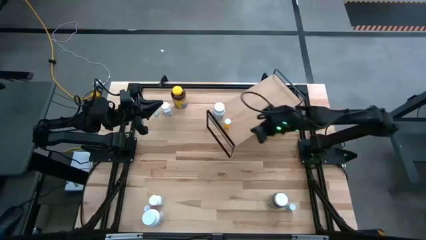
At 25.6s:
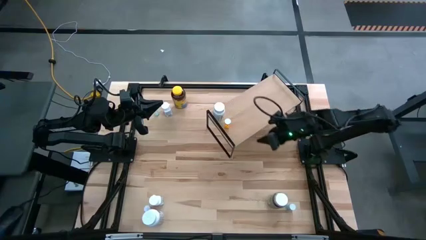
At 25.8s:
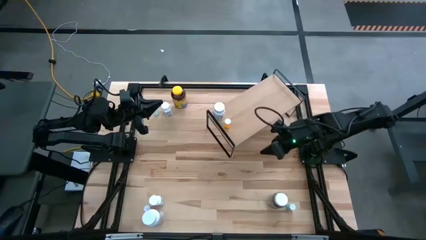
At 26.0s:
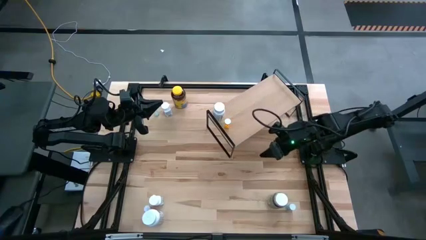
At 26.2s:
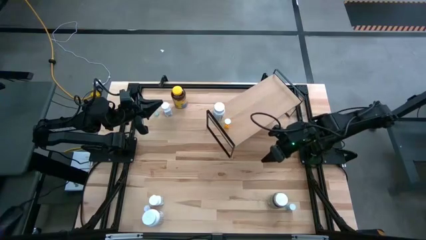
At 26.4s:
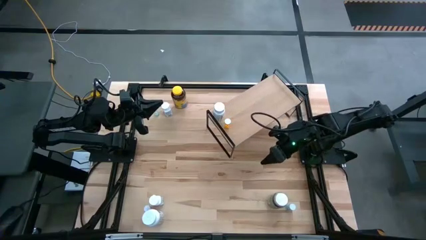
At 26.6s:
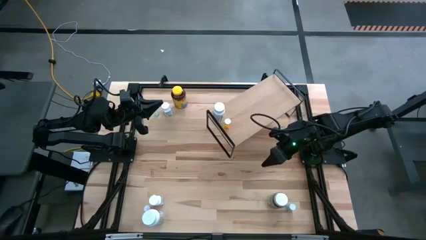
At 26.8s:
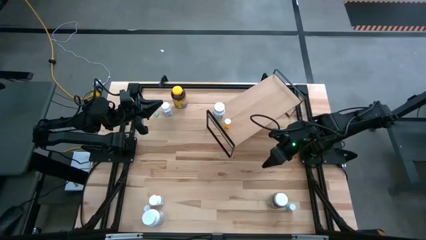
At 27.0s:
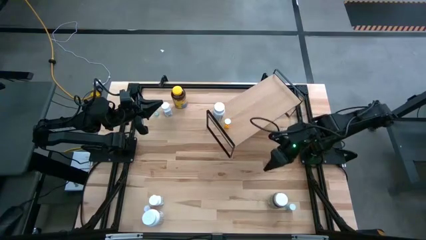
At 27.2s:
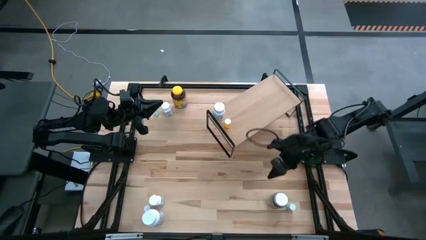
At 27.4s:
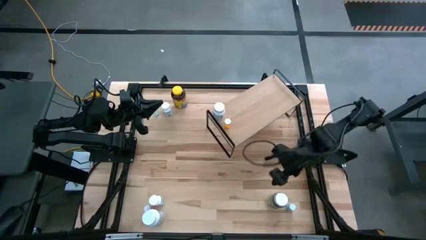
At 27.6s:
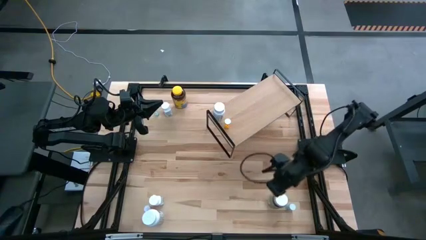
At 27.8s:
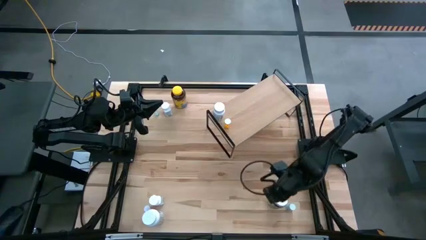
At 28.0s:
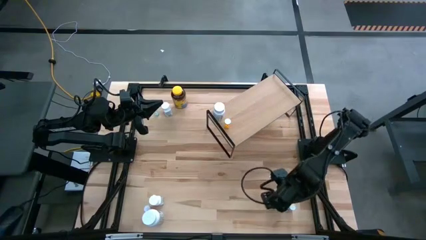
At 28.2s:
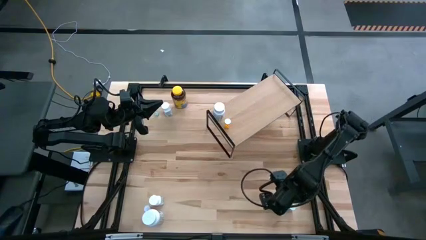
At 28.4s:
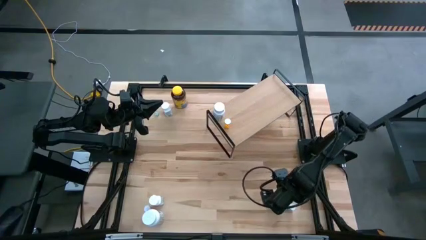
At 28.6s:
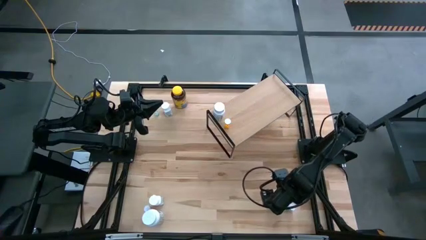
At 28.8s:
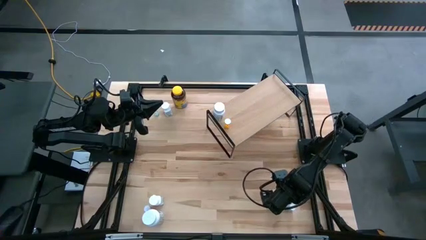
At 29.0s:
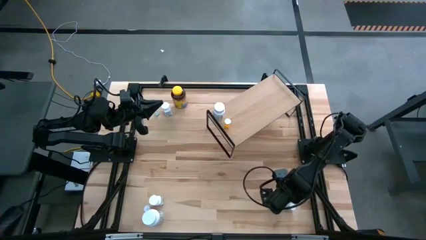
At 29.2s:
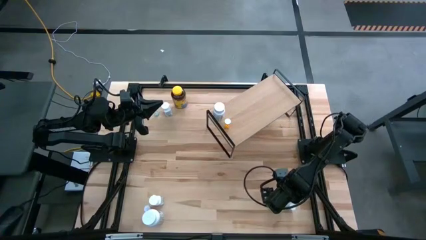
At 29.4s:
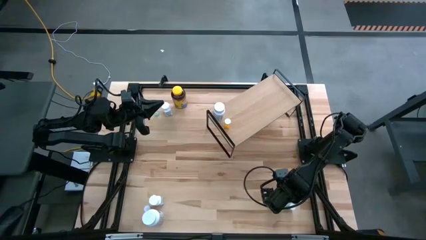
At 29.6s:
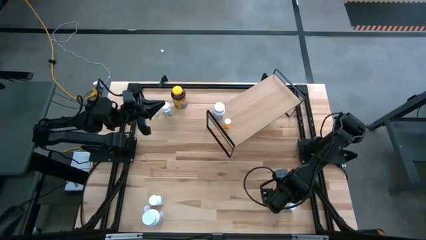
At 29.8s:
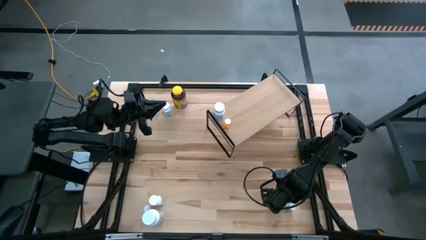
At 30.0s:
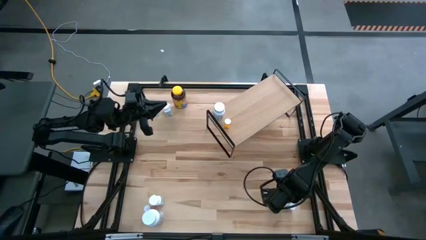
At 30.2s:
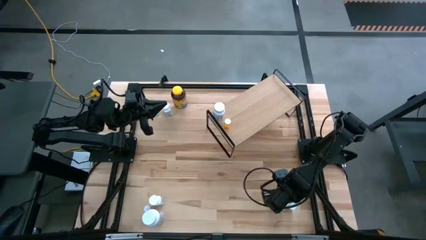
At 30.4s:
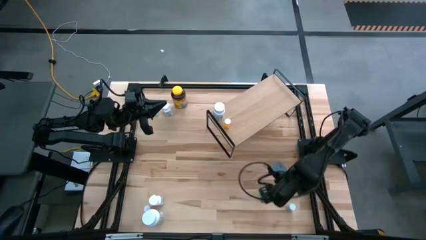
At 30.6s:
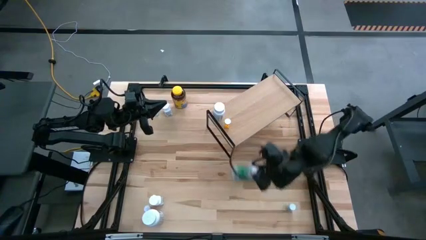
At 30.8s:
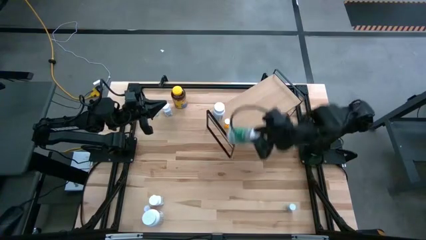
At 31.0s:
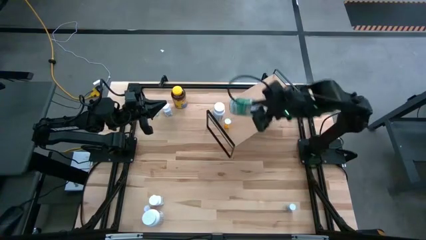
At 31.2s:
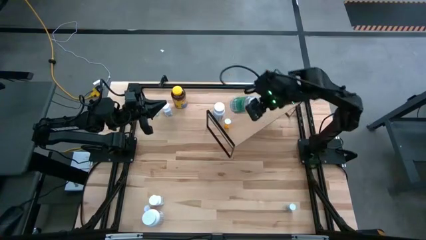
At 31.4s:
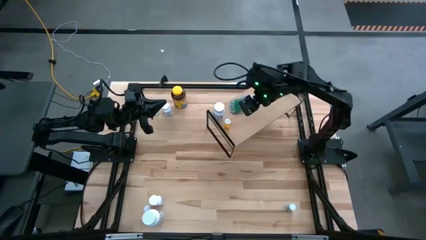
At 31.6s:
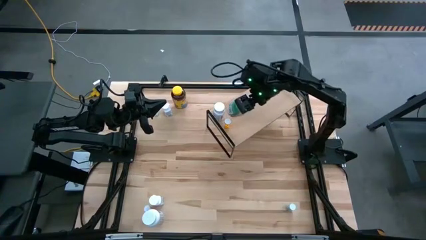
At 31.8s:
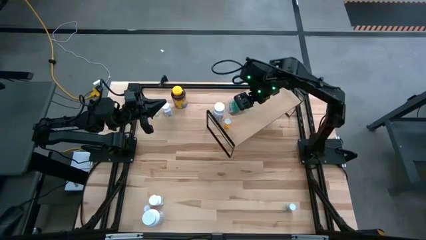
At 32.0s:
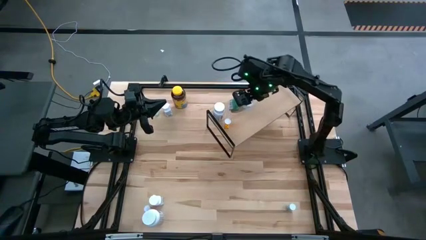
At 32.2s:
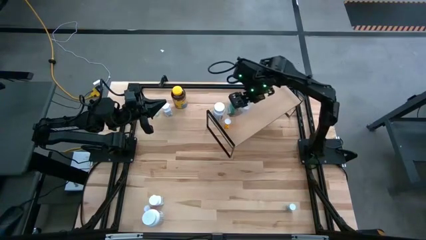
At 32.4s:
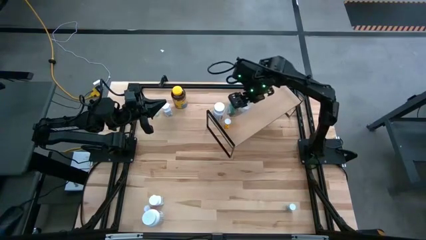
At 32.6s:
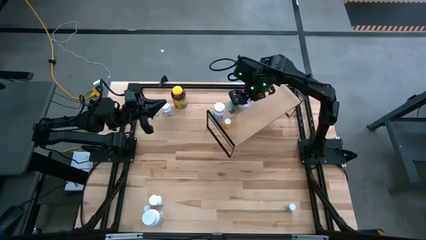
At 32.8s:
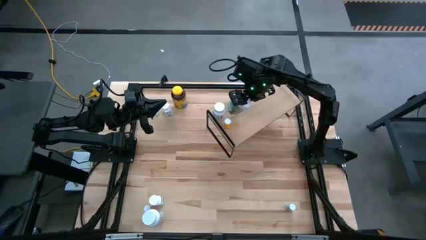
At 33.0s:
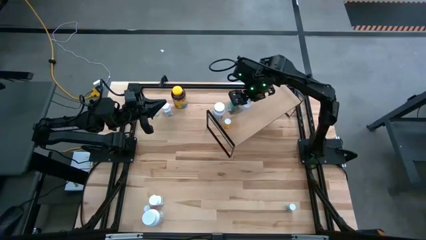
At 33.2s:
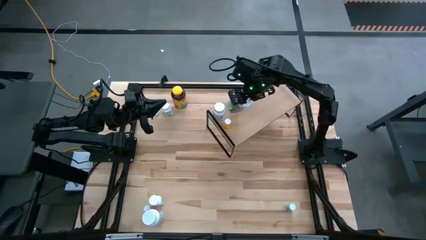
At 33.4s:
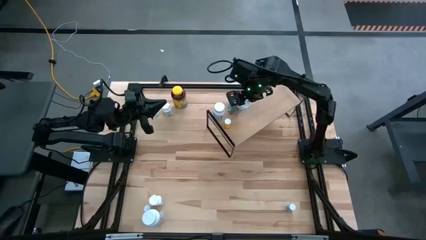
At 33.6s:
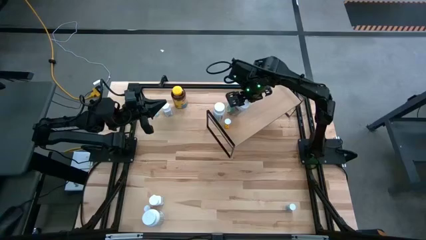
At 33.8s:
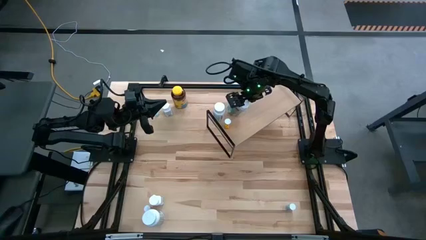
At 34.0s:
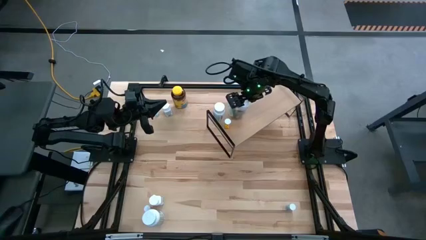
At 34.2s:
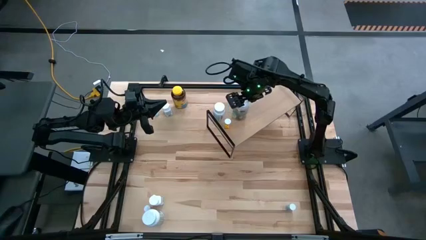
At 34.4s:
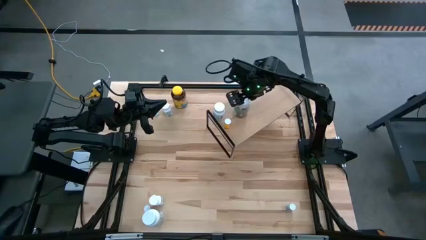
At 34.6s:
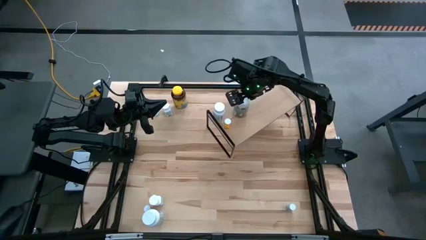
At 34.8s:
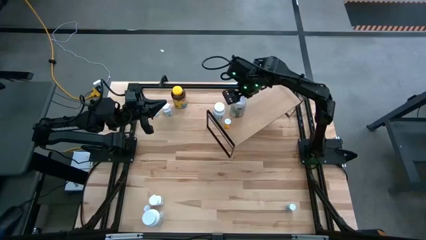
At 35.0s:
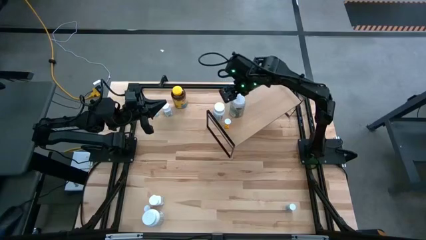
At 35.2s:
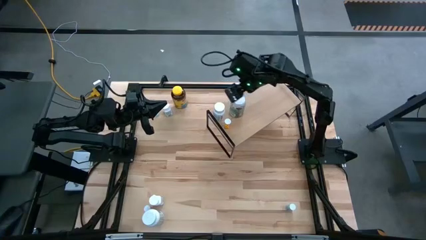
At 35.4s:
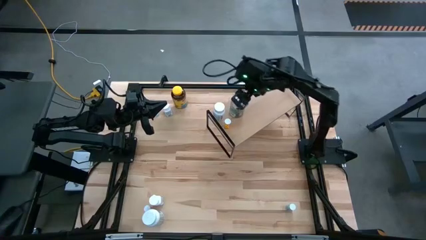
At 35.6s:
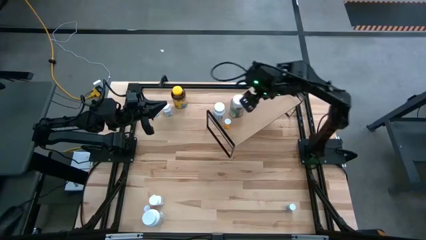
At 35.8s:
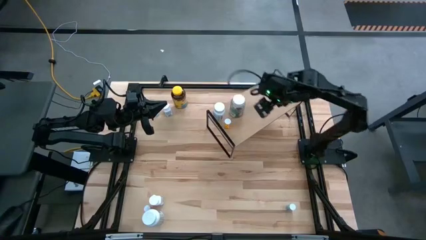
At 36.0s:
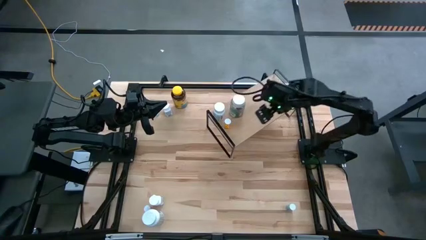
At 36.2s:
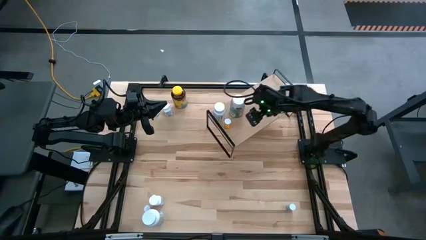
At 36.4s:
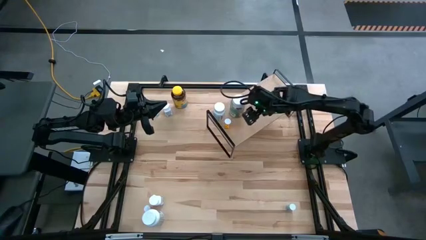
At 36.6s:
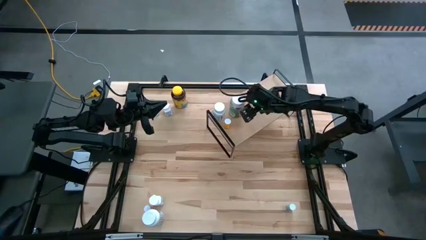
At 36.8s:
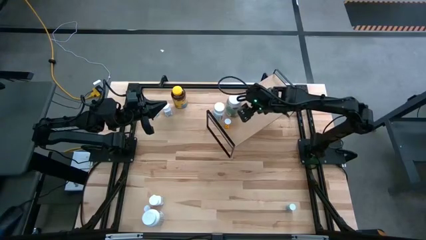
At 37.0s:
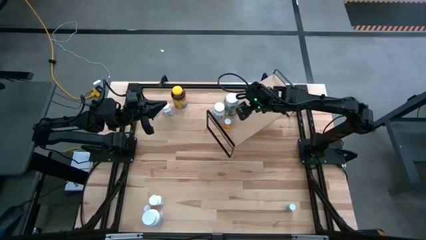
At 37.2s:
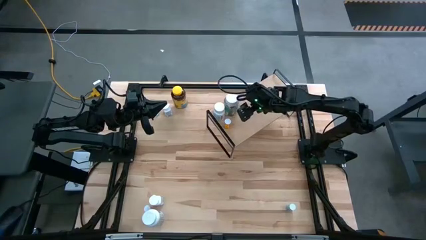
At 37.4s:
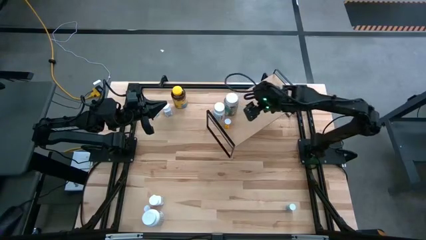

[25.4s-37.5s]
Task: Pick and place medicine bottles onto shelf by color
Put the transparent pill bottle on the shelf

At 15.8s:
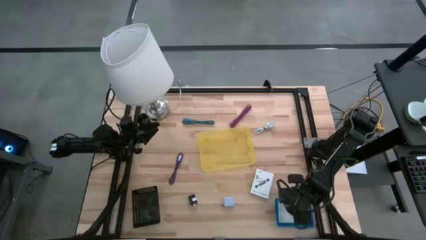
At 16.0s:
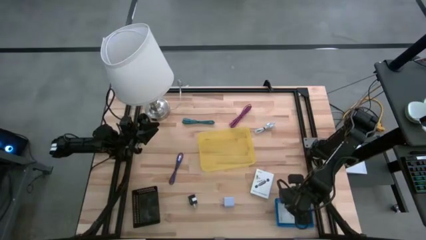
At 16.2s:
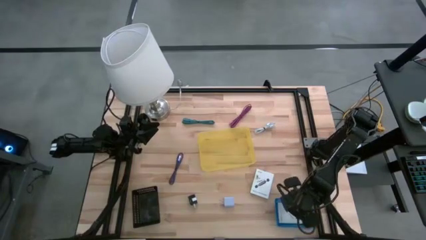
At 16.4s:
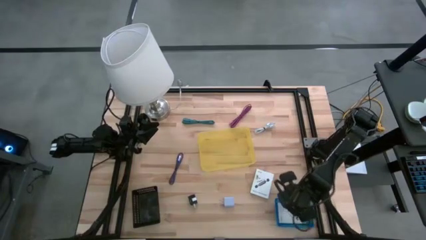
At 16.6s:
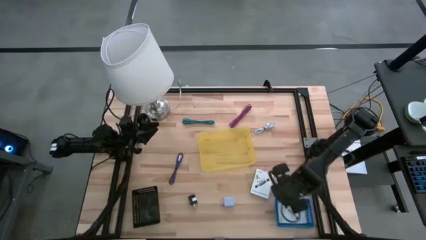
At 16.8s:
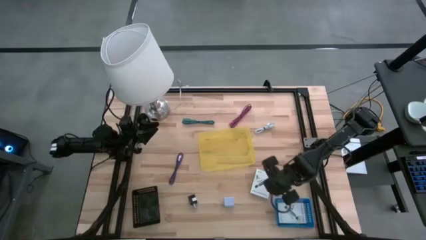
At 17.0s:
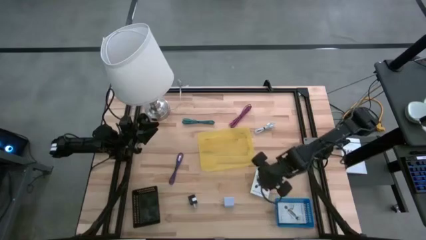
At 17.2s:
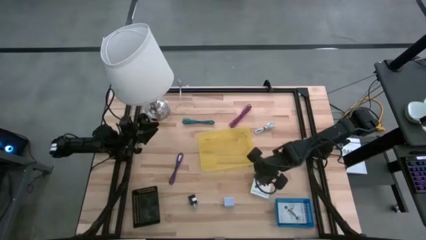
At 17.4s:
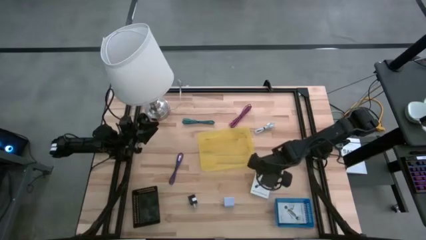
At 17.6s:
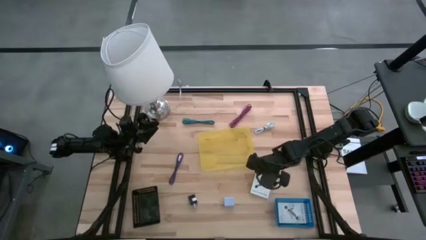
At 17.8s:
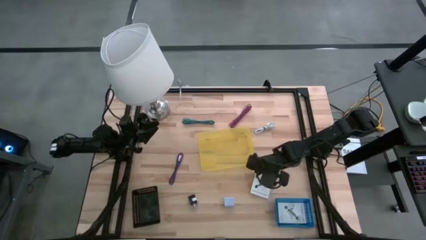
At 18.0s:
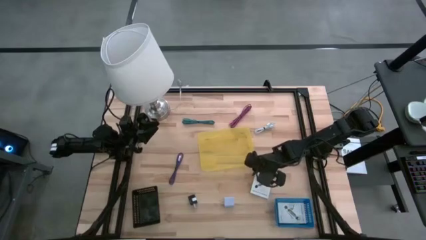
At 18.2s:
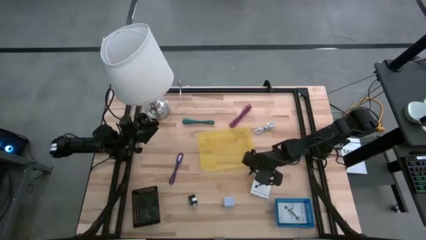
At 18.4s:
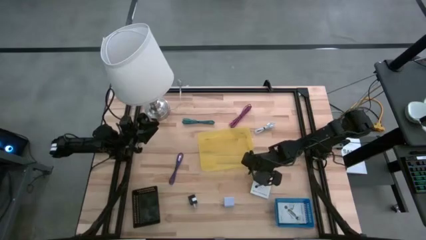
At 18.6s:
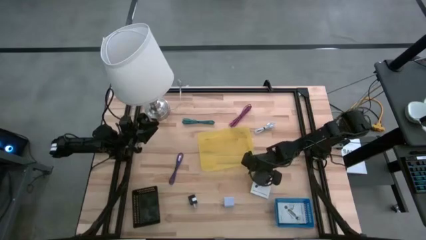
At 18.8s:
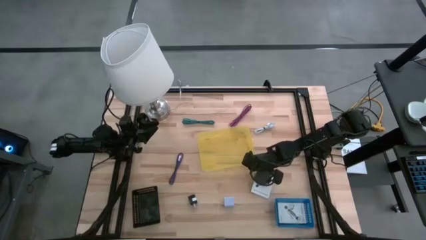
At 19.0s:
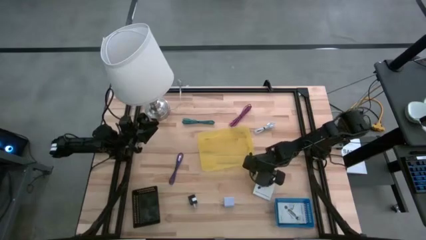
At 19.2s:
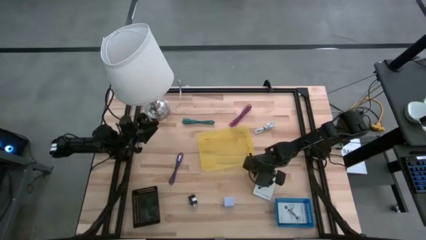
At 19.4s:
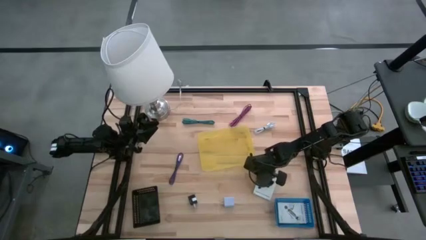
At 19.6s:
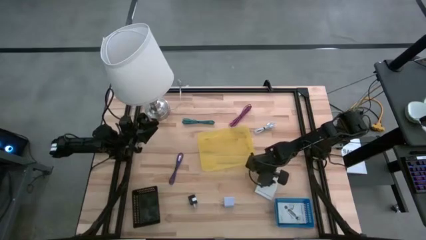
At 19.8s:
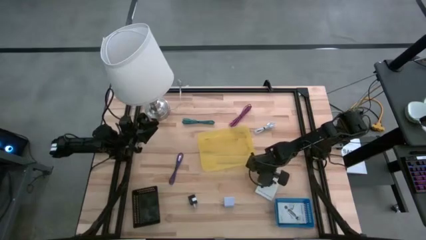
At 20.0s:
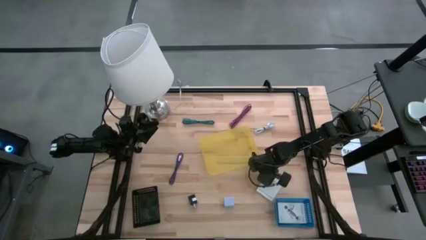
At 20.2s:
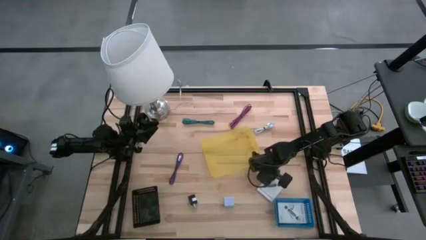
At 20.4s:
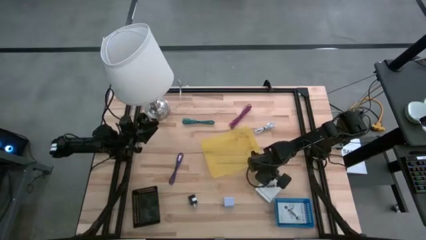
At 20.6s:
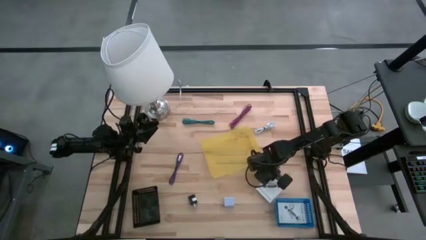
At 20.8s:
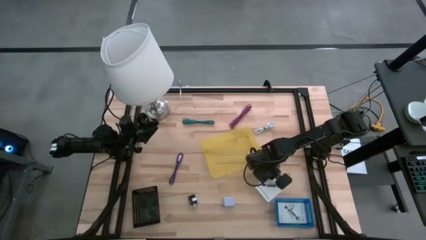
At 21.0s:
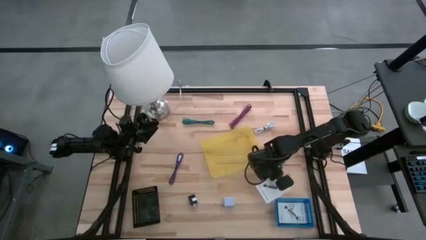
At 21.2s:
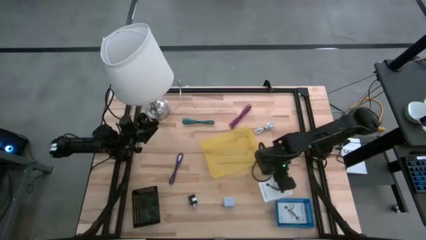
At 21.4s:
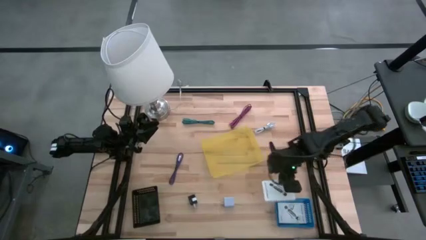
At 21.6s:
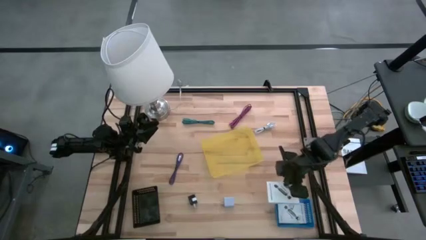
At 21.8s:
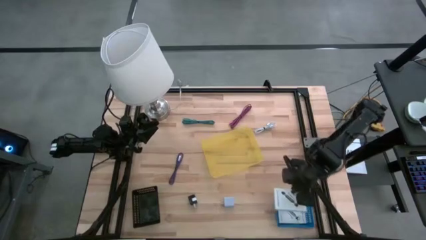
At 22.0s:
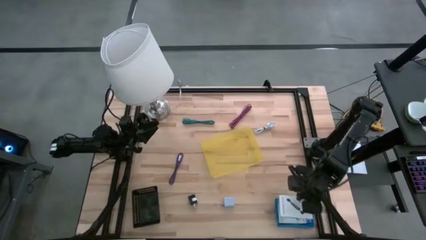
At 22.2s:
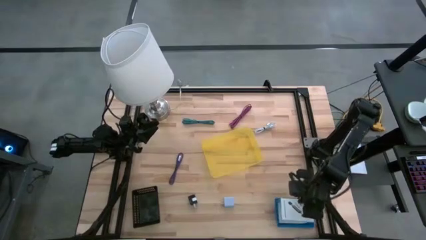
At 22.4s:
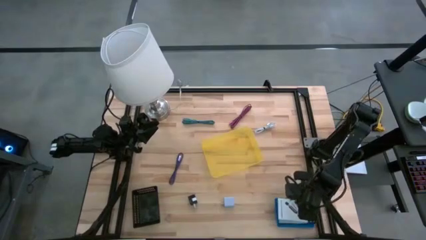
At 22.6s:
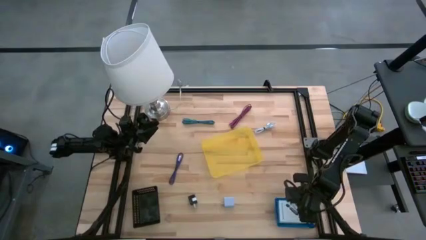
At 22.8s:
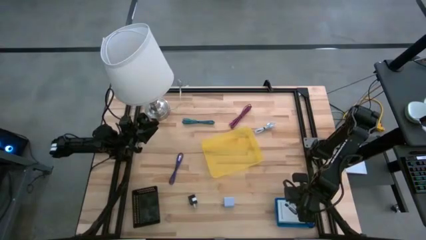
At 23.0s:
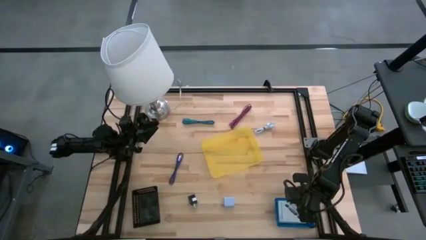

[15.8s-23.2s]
Task: Pick and place items into bin
Stack the card reader box on top of the card reader box in the blue bin
